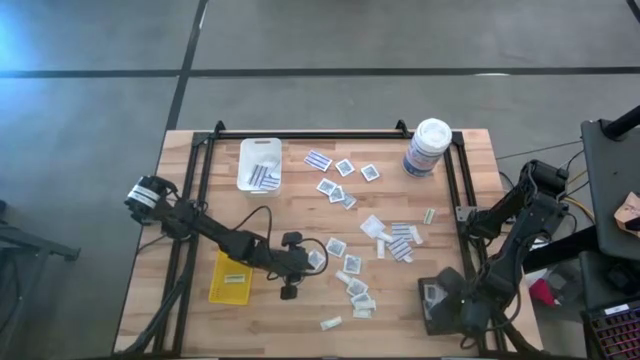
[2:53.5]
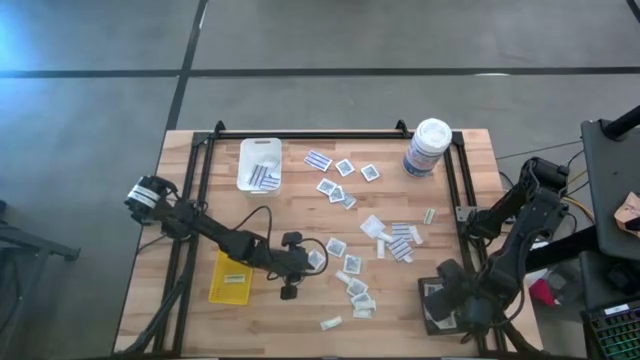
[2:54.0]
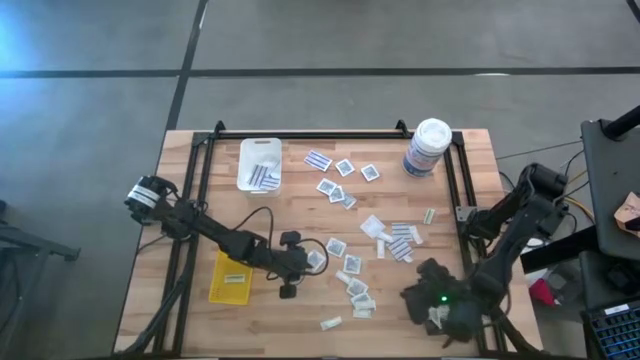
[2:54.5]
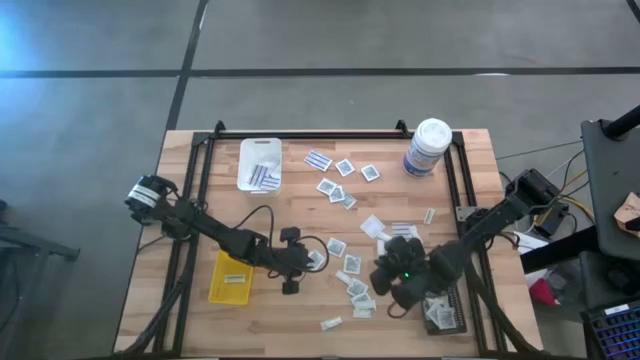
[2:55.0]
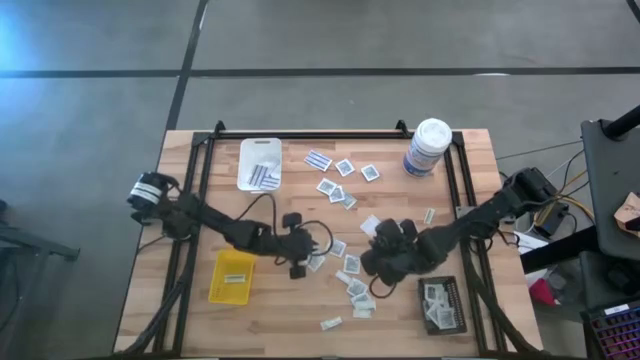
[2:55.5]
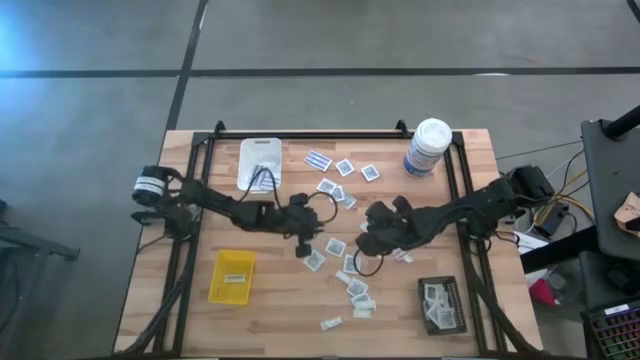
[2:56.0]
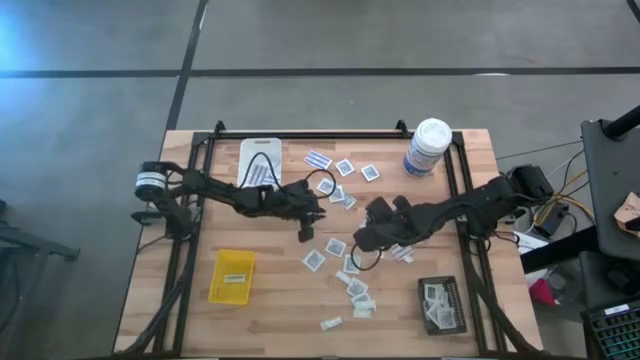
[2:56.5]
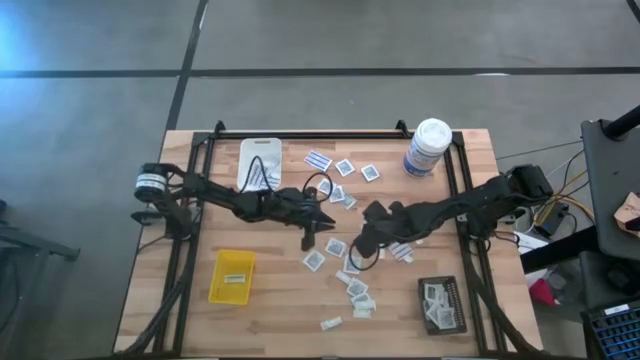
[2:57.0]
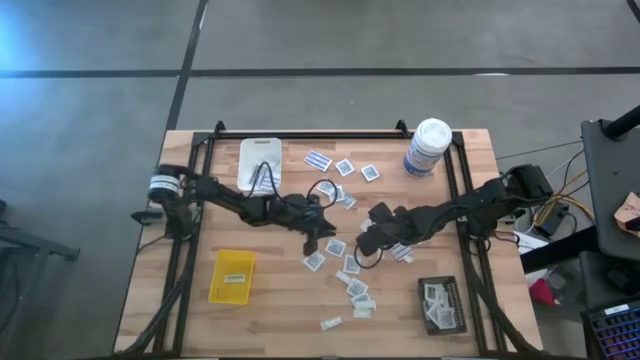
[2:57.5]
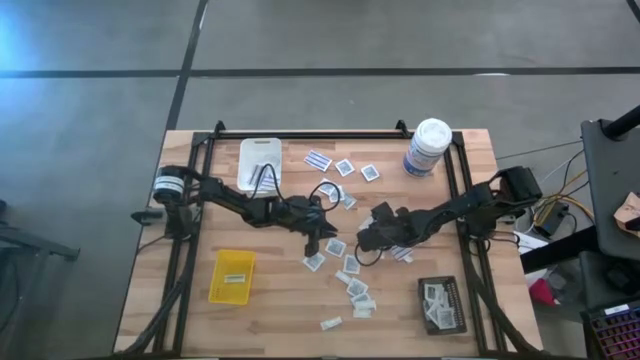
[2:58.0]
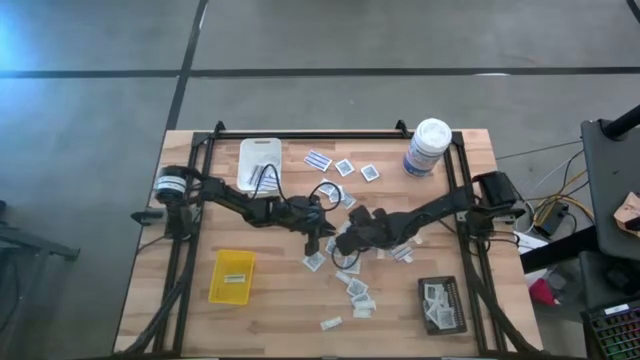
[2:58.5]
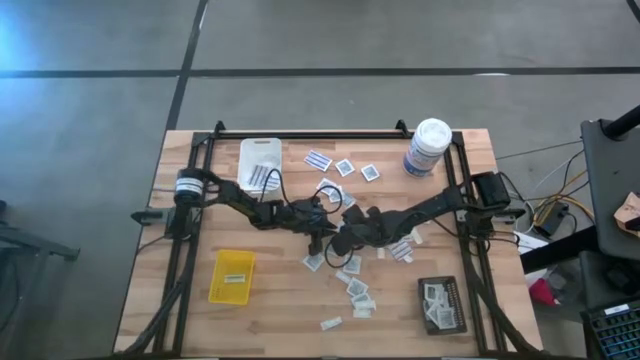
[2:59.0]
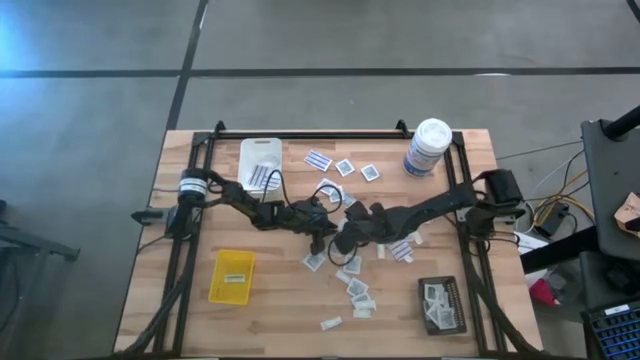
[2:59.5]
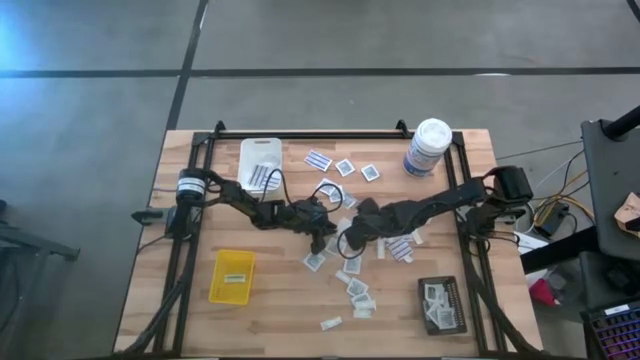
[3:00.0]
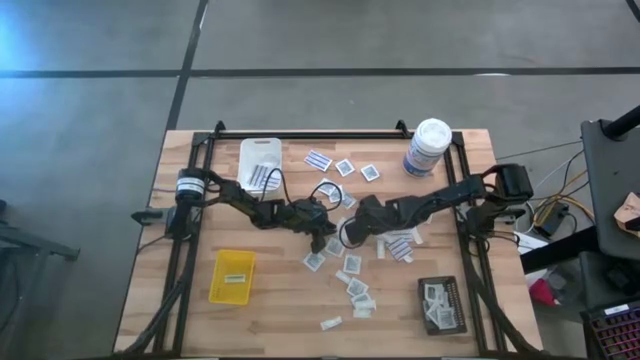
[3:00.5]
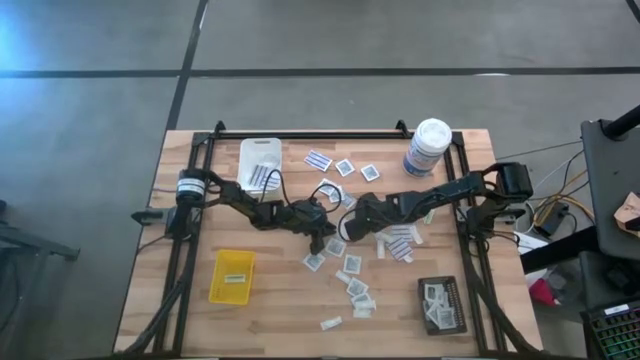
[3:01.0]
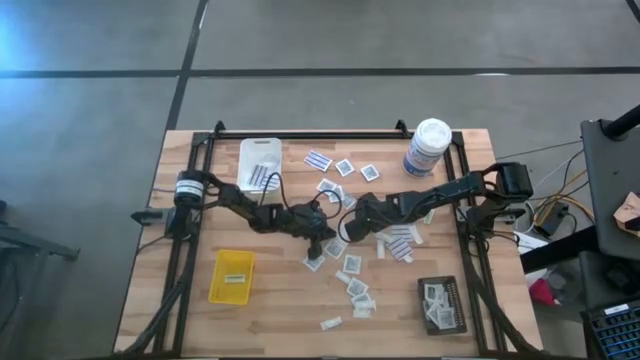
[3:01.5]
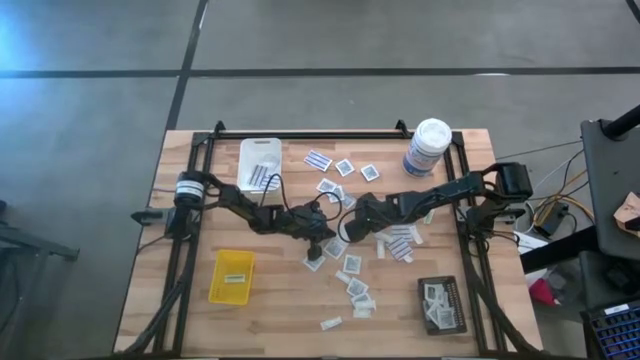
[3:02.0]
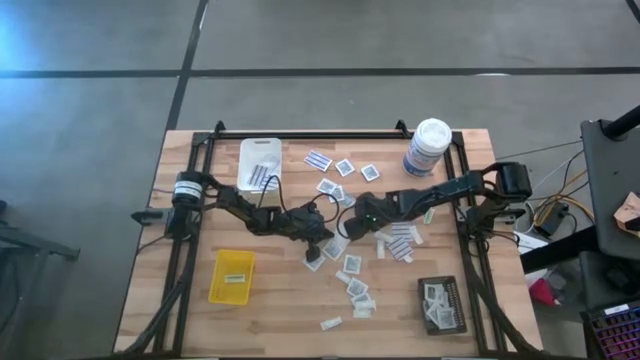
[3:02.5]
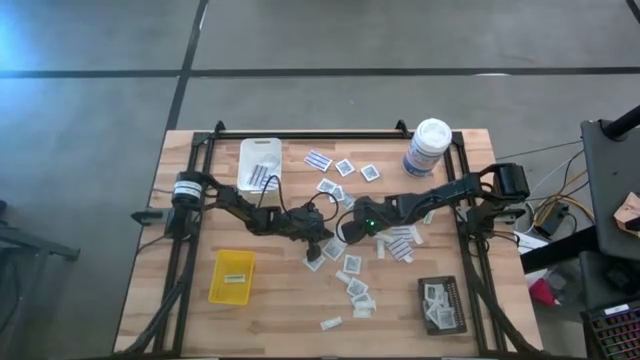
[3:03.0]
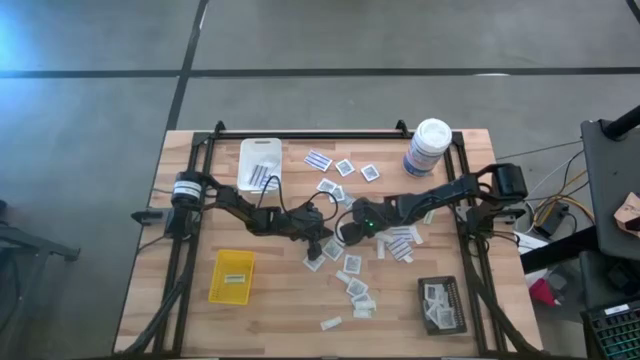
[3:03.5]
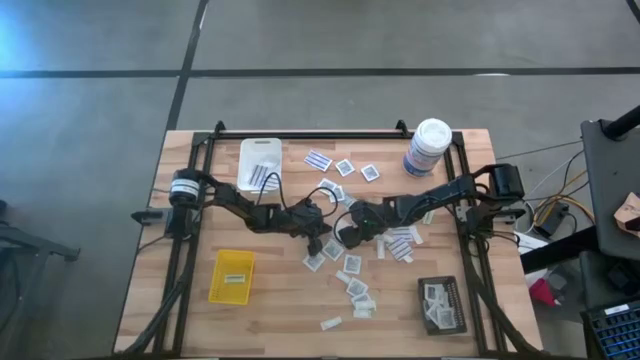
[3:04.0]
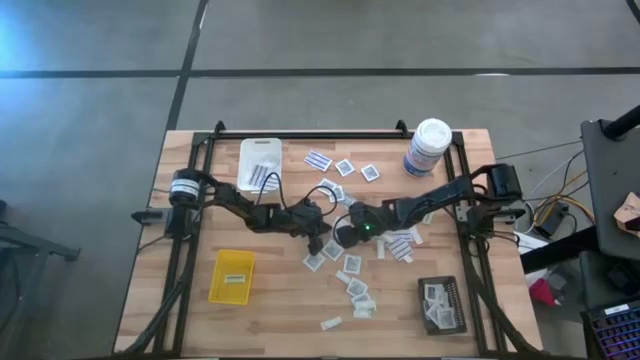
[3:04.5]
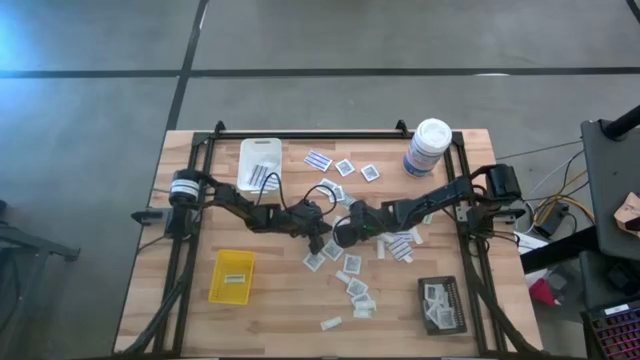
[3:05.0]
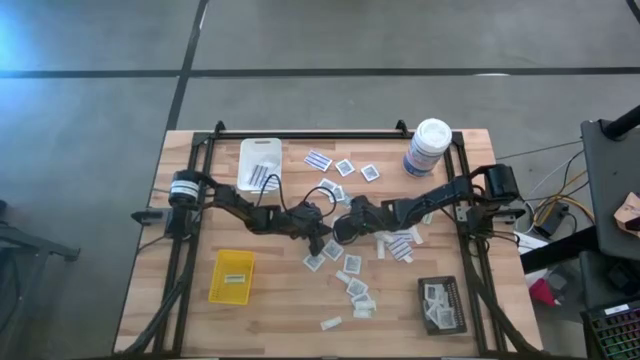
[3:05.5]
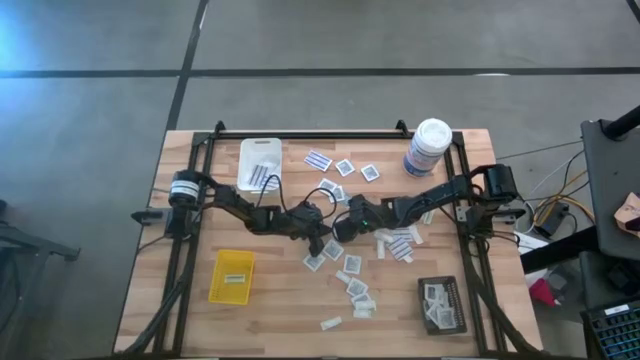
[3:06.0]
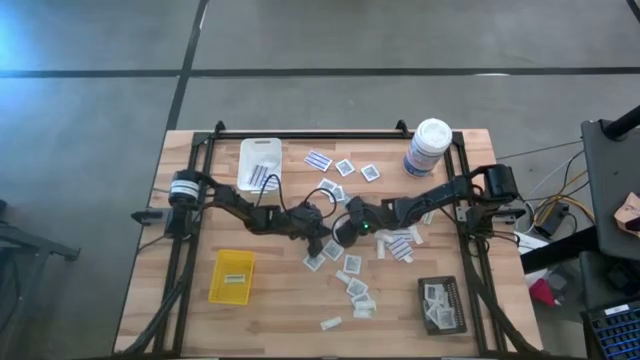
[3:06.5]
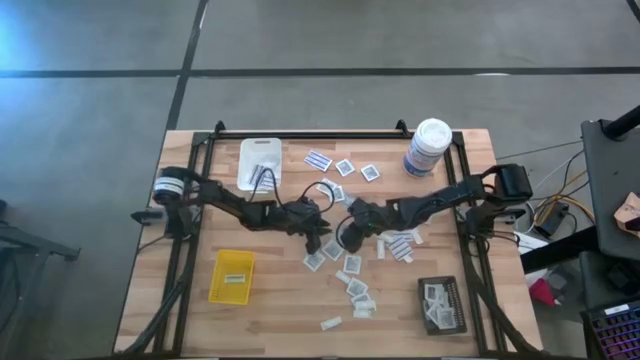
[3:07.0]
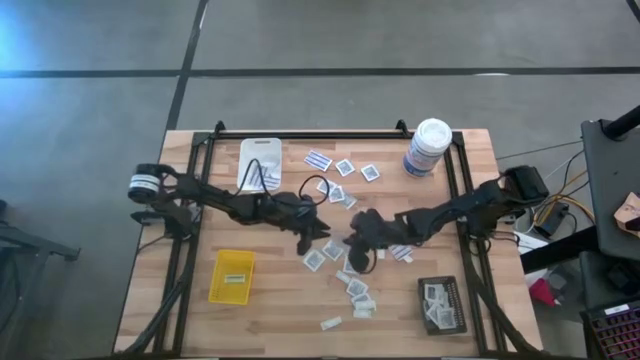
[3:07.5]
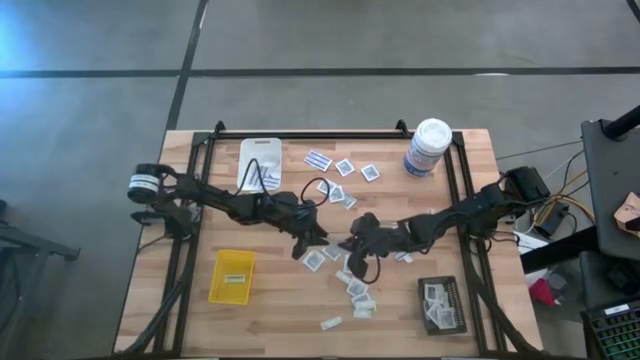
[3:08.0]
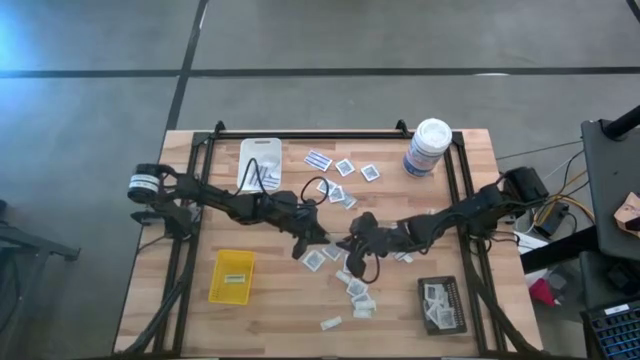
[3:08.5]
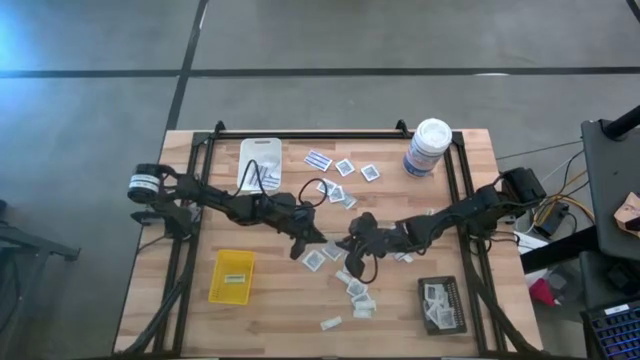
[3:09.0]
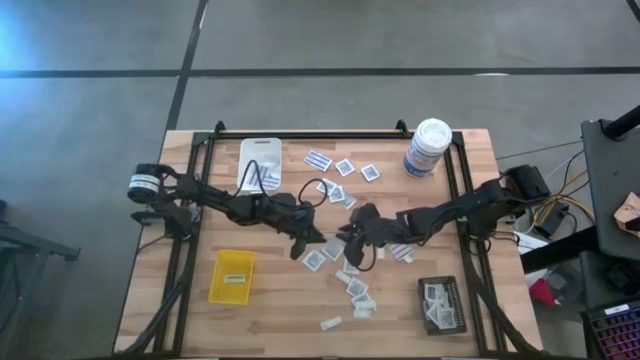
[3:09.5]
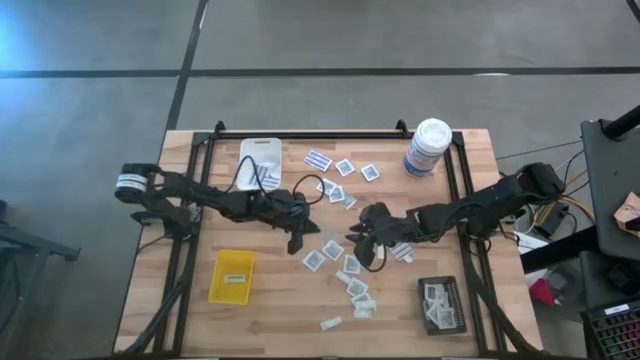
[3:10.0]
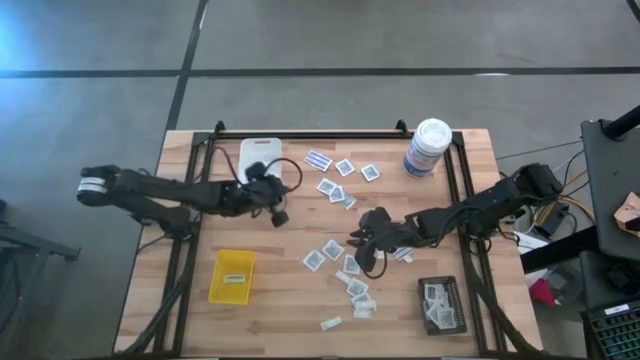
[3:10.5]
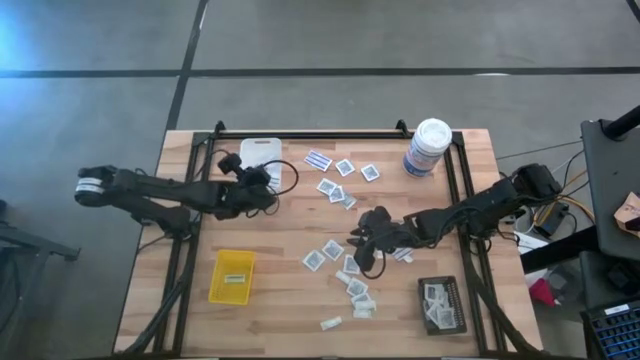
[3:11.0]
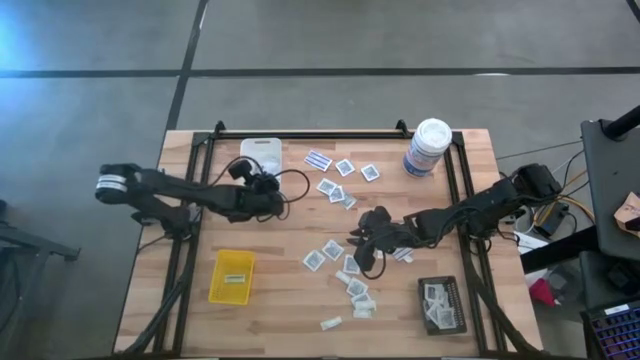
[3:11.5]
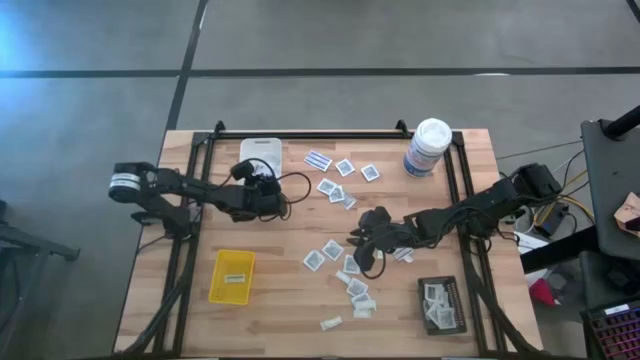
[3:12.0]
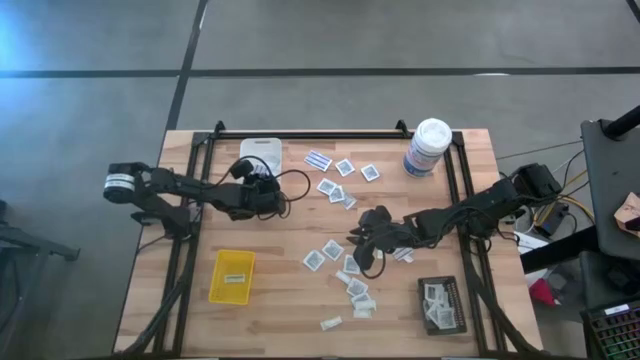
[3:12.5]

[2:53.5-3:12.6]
Task: Pick & Place First Aid Supplies
Put the blue bandage into the white bin

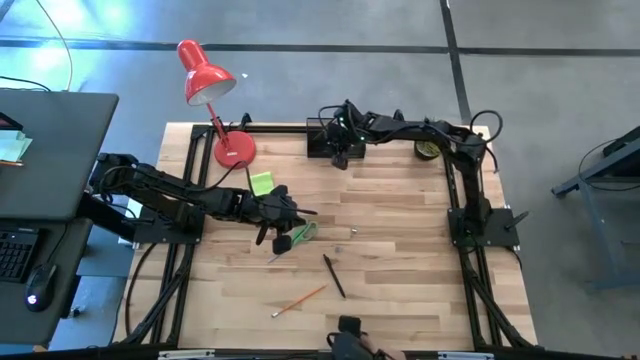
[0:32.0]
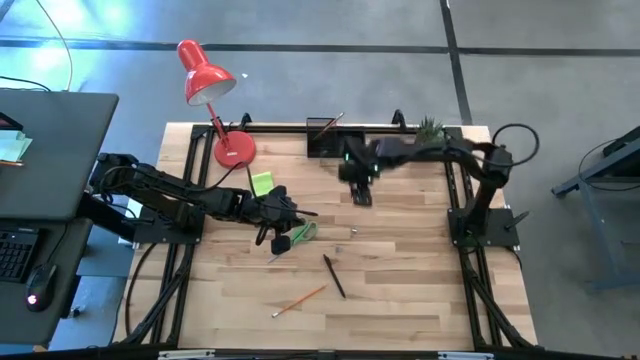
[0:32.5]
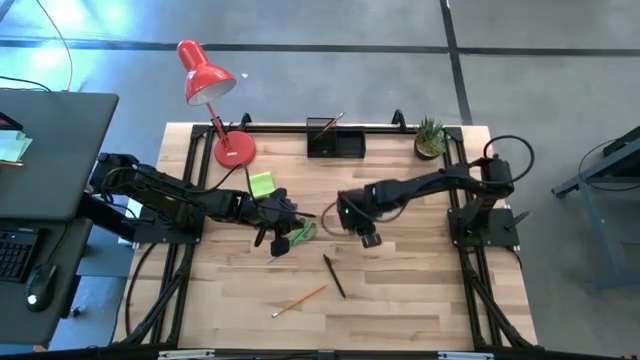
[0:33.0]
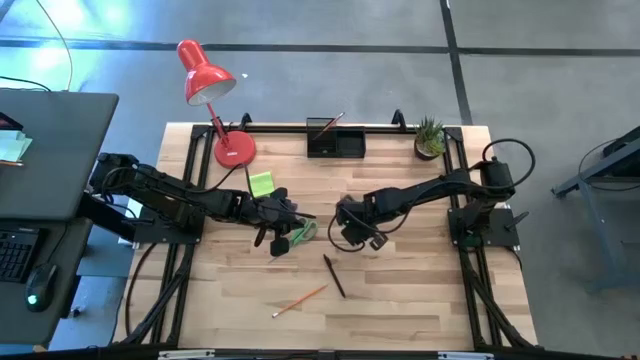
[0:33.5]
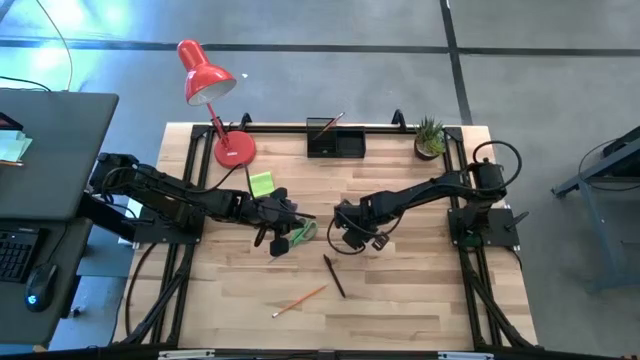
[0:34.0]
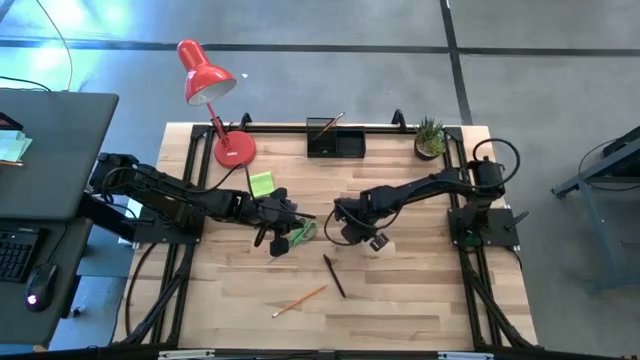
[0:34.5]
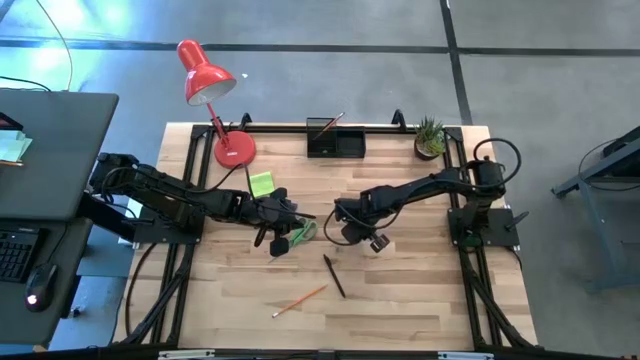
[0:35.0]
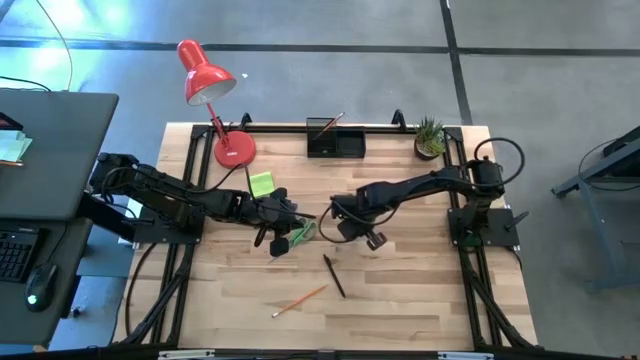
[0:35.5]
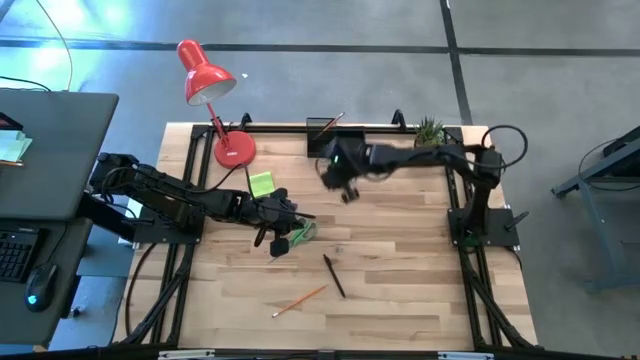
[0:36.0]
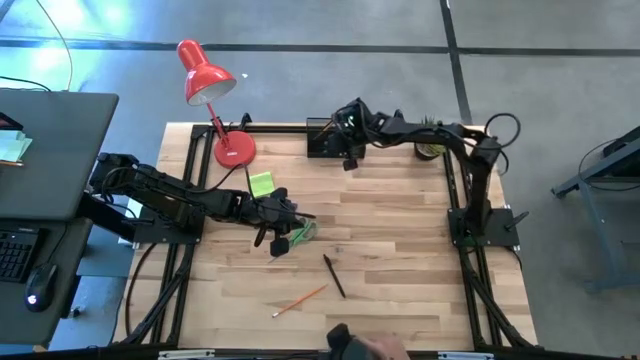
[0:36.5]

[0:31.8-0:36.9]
Task: Pick and place office supplies into organizer
Put the top blue binder clip into the desk organizer
